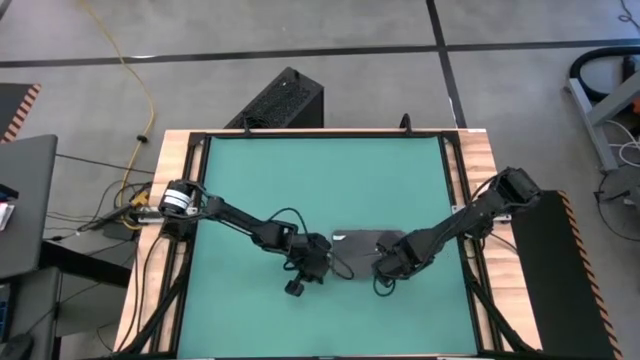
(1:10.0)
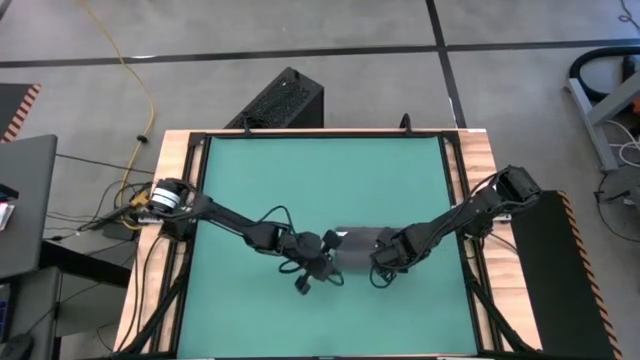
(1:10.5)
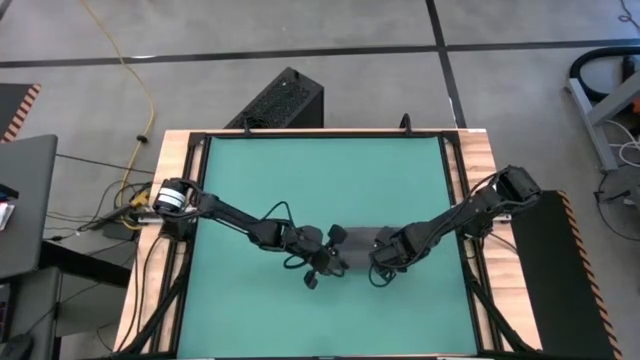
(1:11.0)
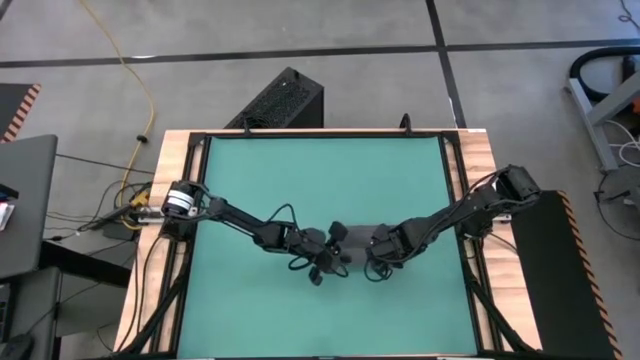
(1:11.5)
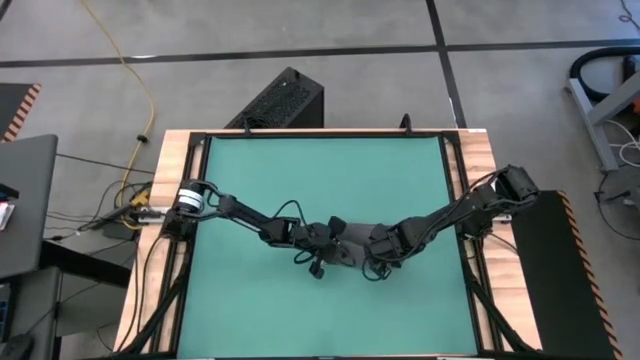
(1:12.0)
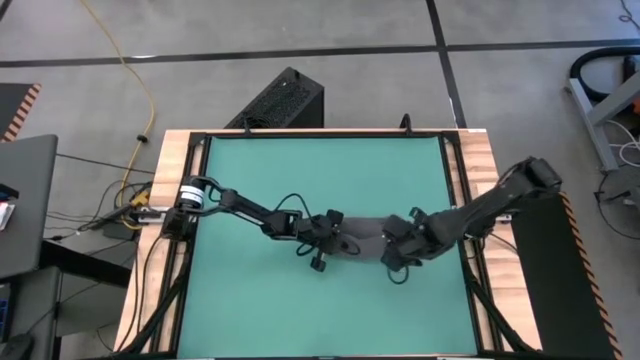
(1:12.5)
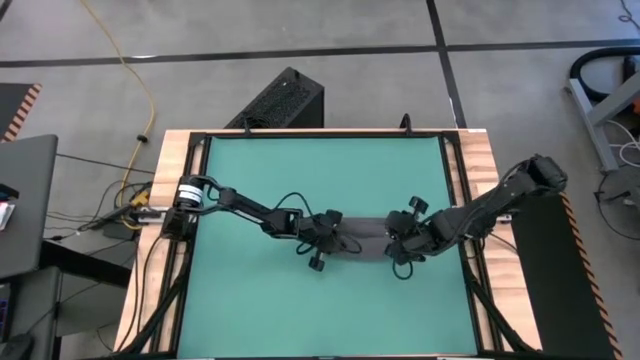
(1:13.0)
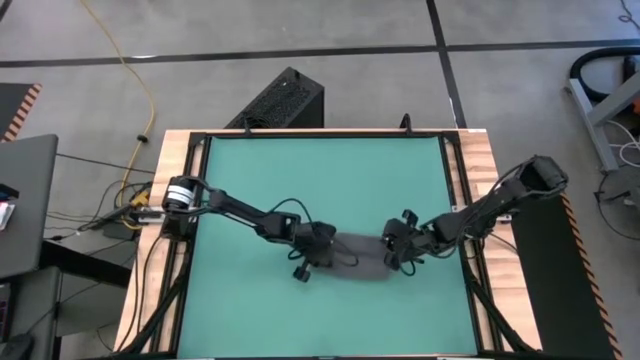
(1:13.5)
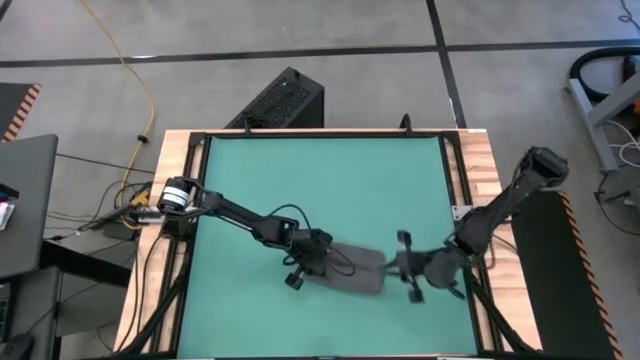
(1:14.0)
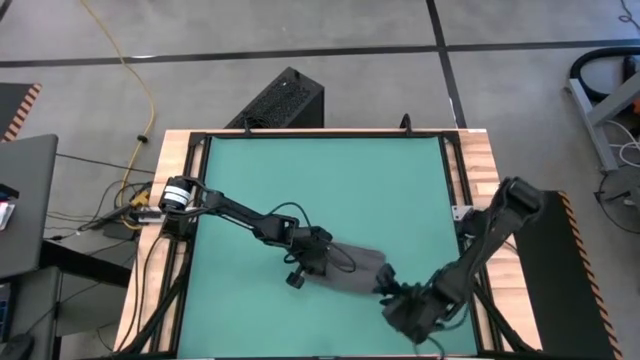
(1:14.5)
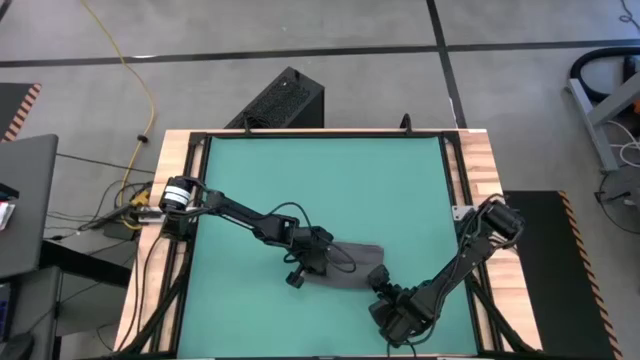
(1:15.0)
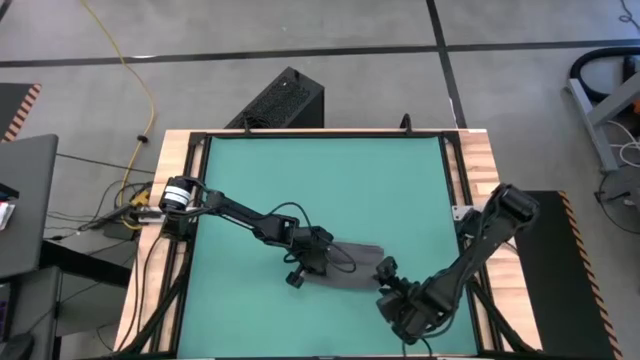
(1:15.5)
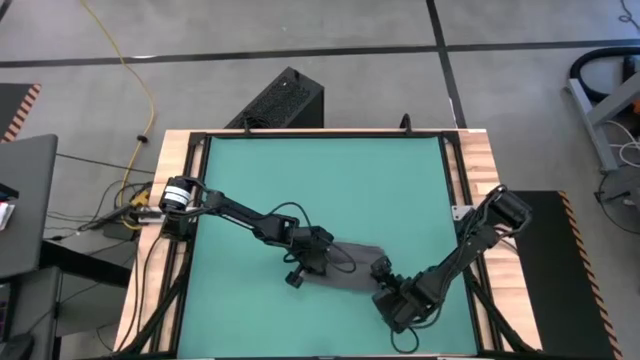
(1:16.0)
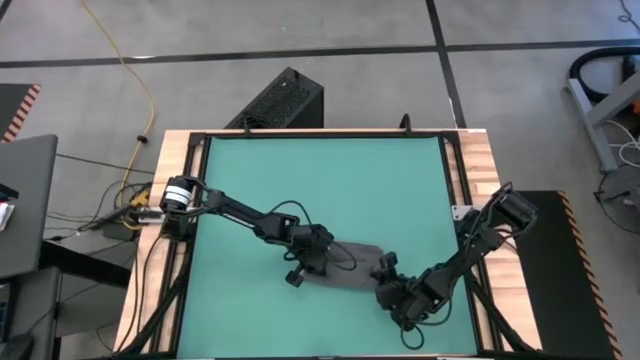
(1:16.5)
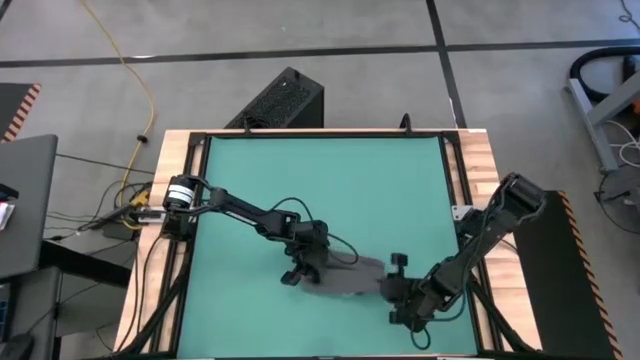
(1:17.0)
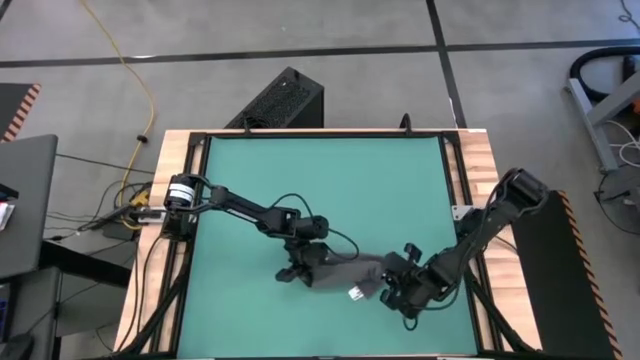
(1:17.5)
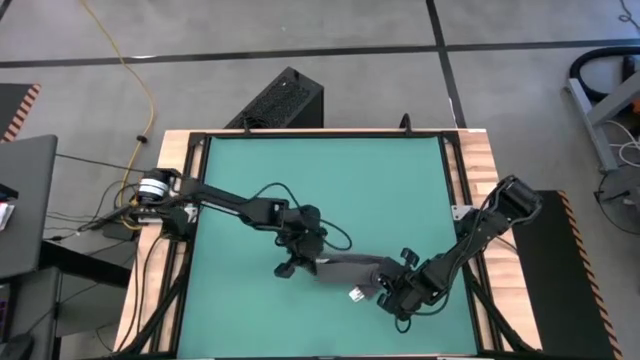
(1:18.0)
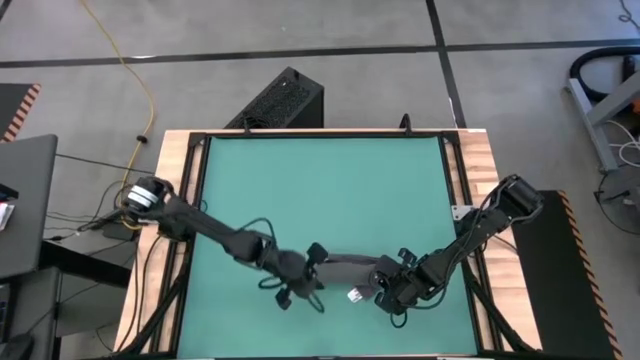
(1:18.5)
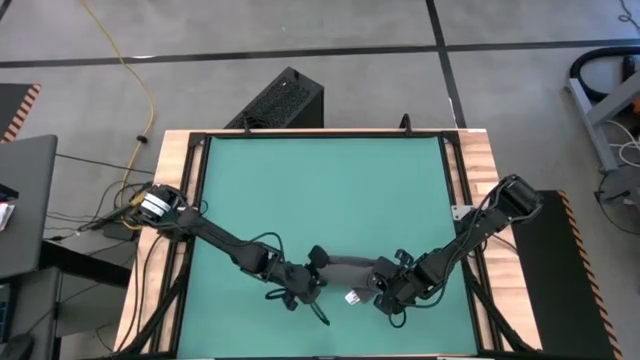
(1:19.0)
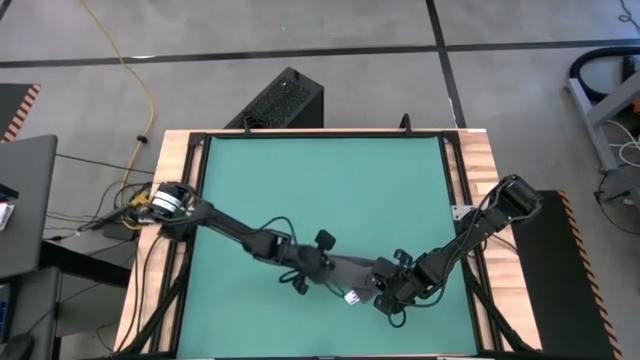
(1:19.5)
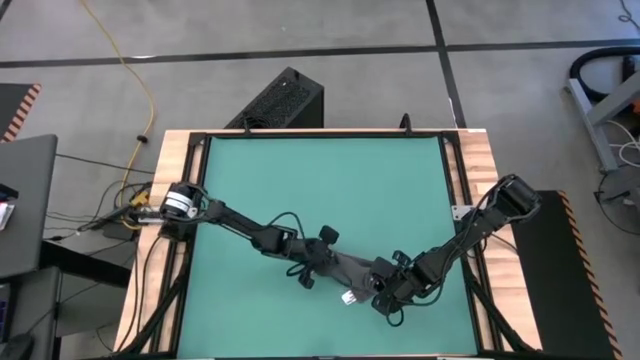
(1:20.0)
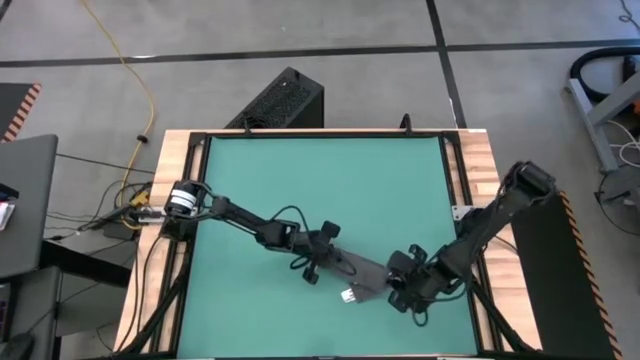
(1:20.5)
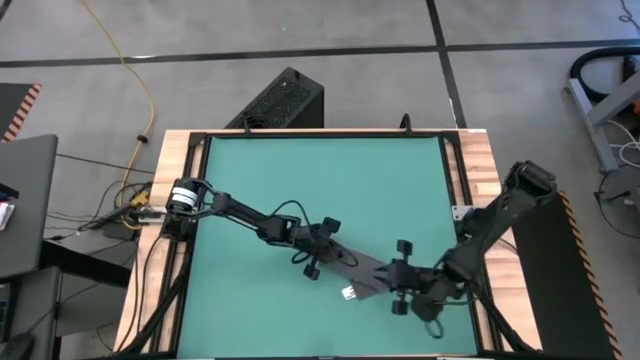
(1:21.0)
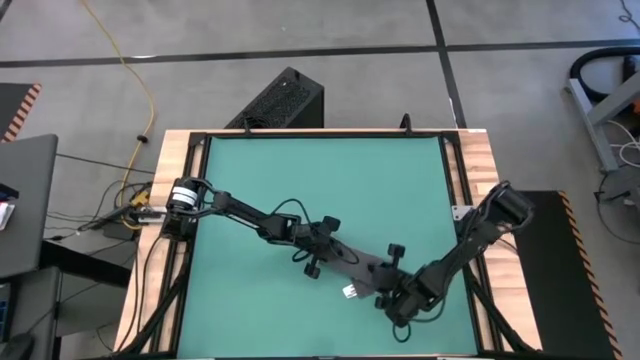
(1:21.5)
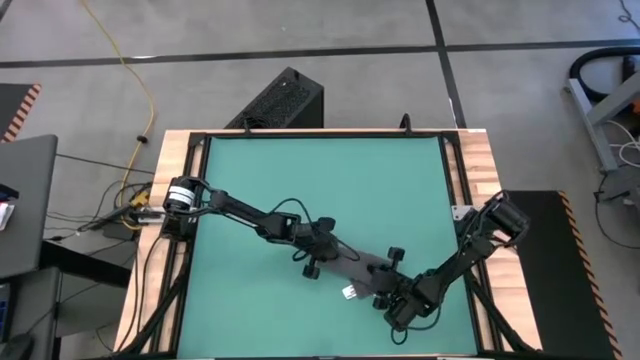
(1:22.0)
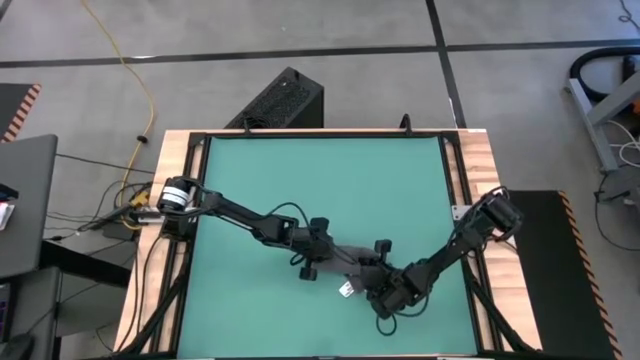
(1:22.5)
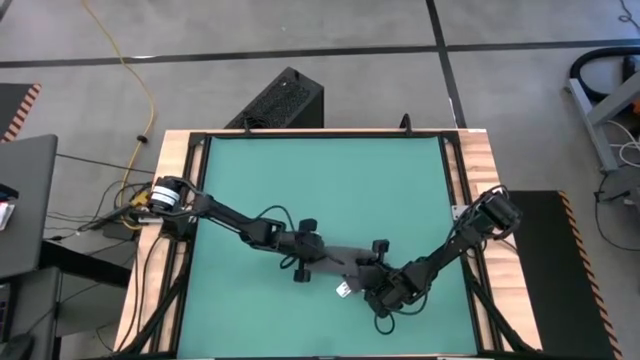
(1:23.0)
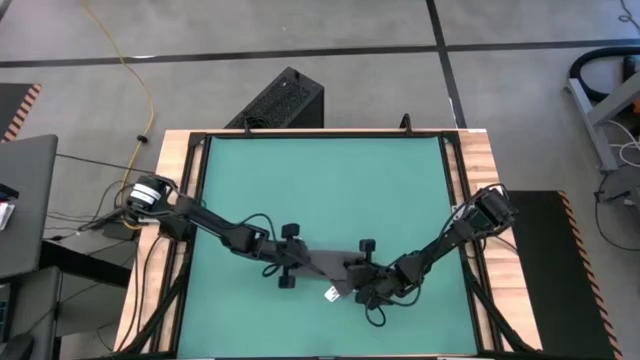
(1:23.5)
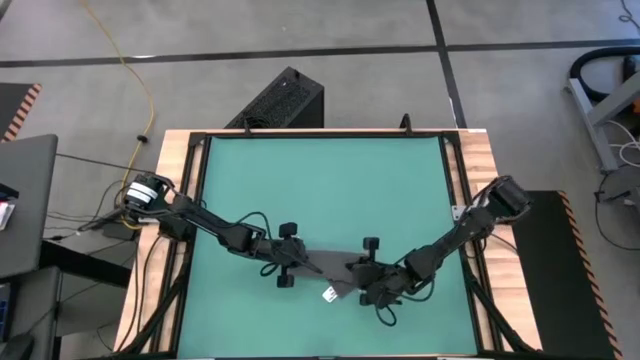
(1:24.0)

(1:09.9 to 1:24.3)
Task: Roll towel into tight, uniform cylinder
Roll the gray towel

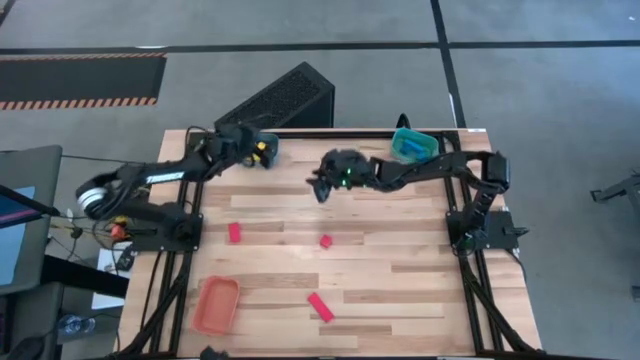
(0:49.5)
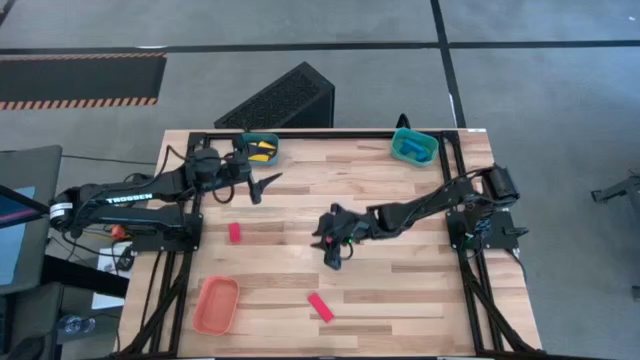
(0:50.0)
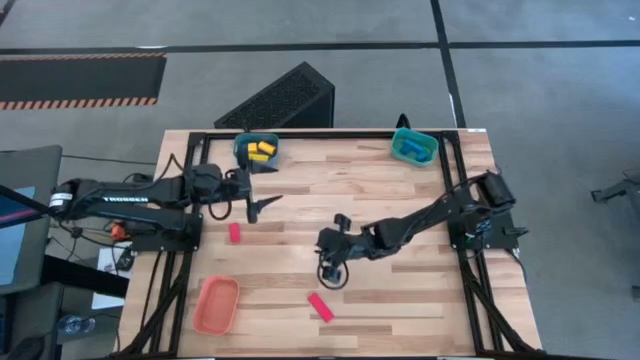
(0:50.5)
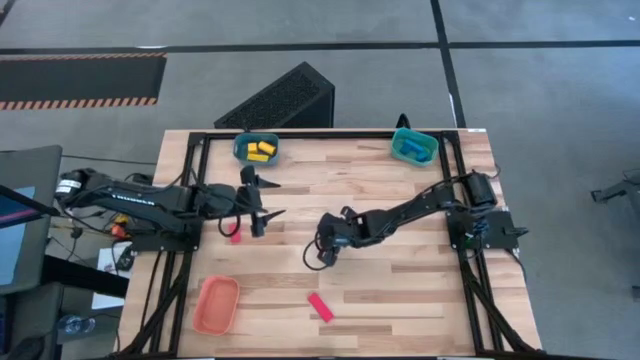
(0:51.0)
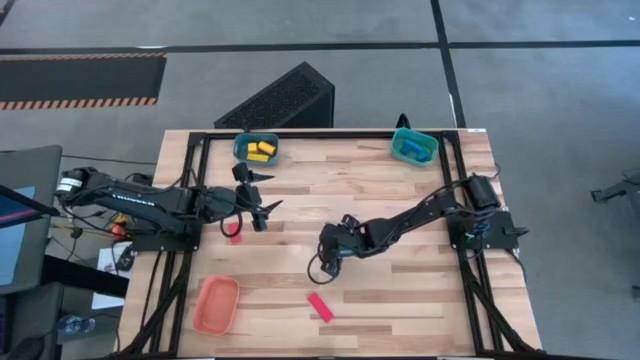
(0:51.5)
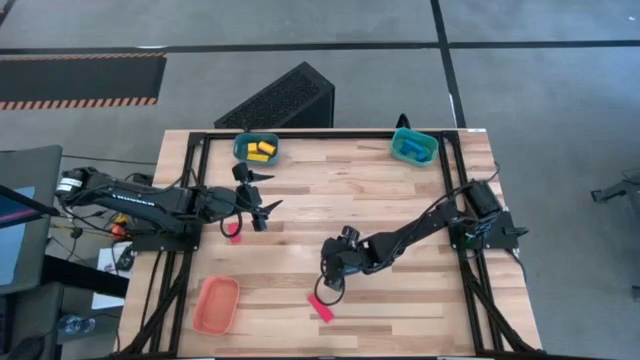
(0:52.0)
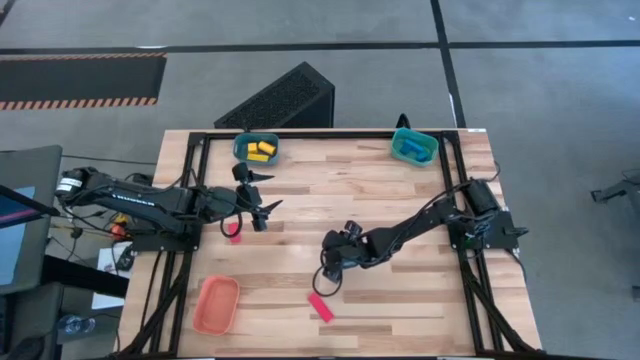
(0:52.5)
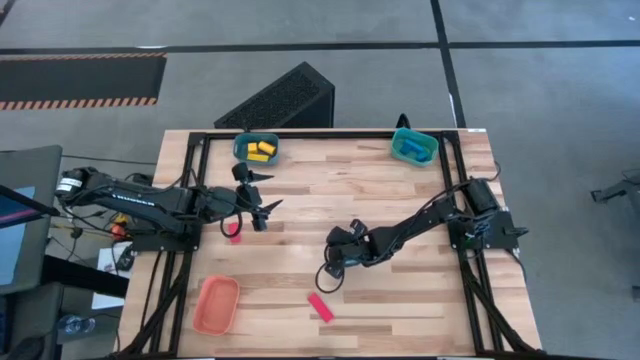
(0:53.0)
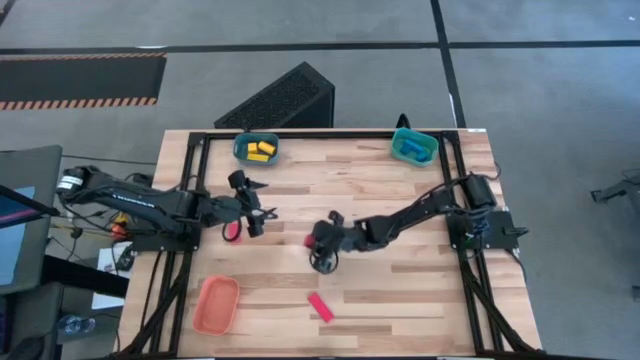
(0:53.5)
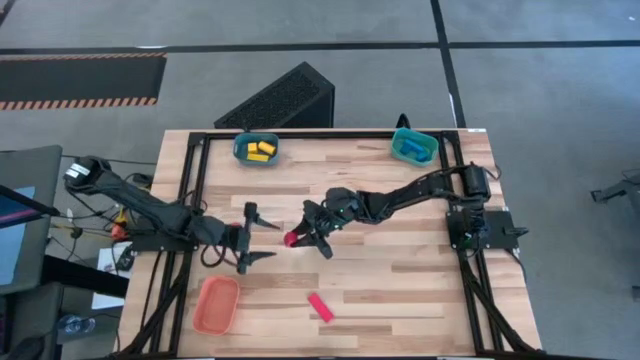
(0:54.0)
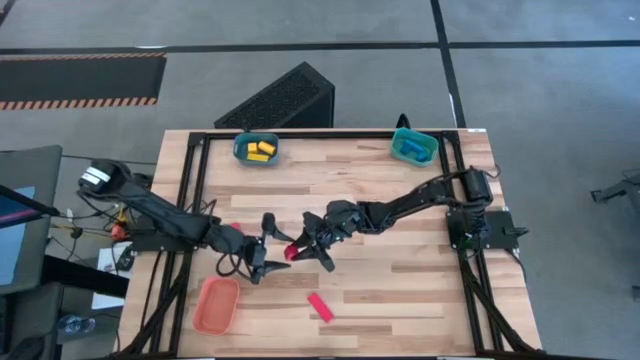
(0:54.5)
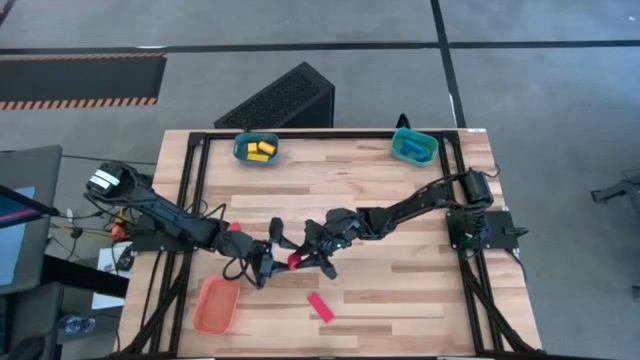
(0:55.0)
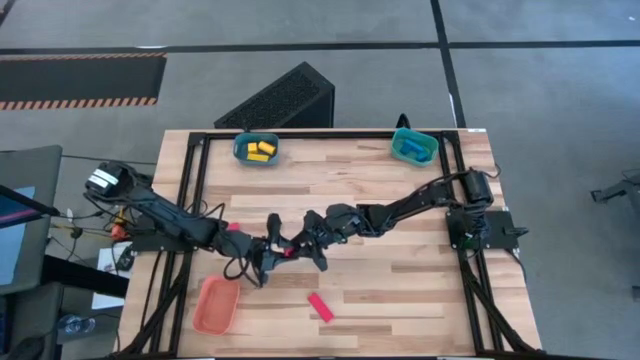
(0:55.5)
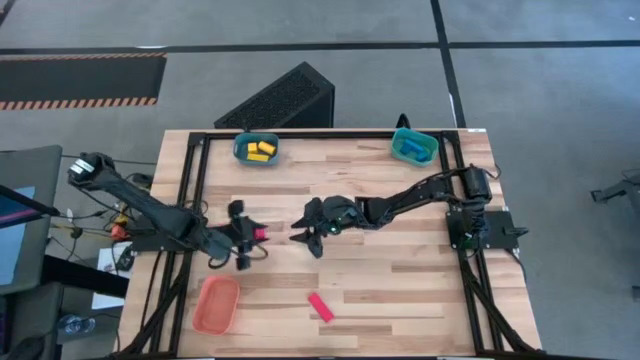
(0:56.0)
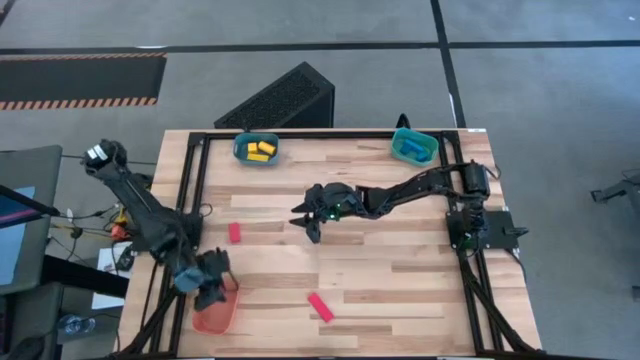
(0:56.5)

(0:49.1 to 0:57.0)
Task: Sort & place blocks by color
Put the top right red block into the orange bin
